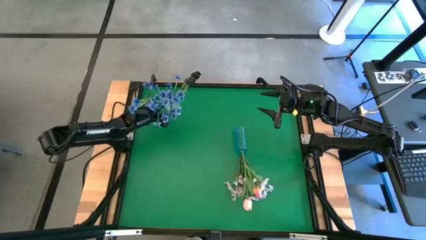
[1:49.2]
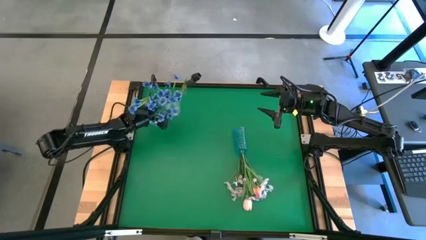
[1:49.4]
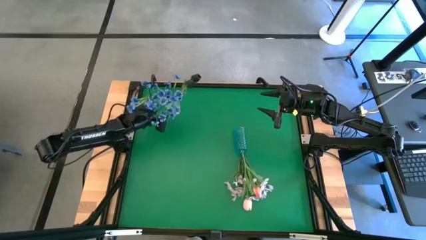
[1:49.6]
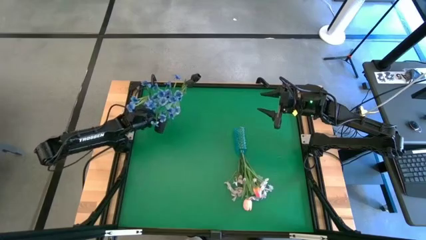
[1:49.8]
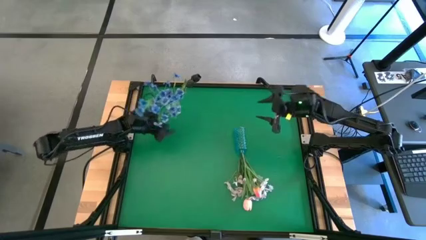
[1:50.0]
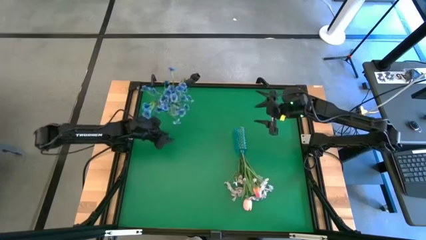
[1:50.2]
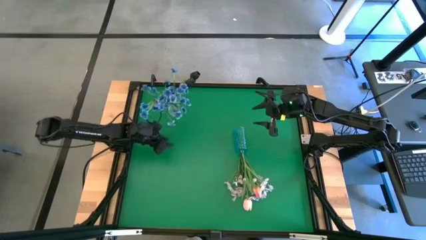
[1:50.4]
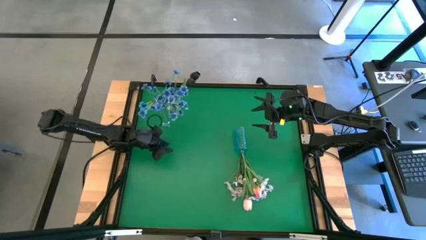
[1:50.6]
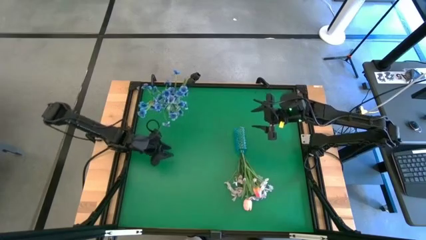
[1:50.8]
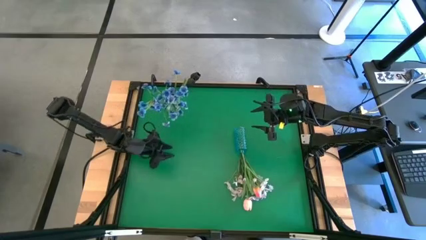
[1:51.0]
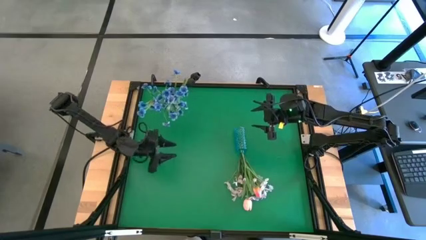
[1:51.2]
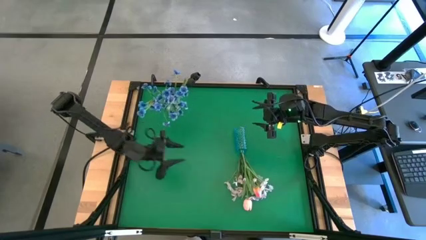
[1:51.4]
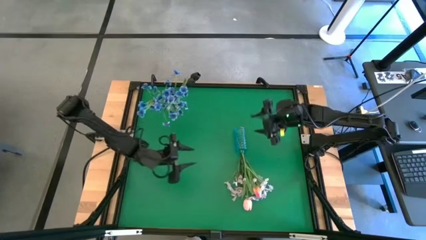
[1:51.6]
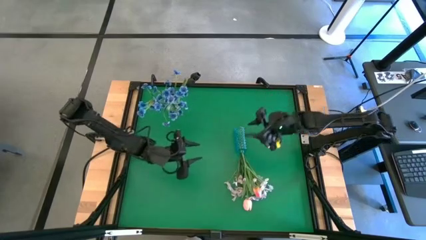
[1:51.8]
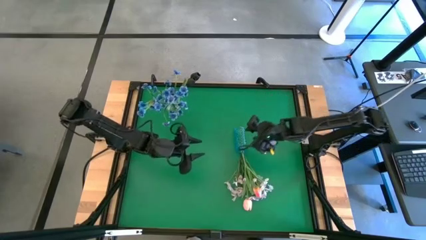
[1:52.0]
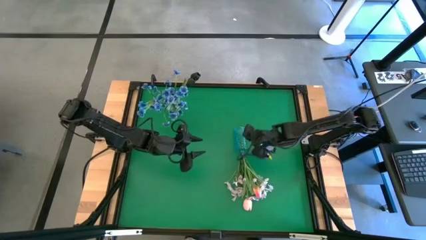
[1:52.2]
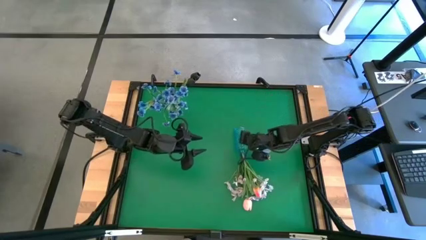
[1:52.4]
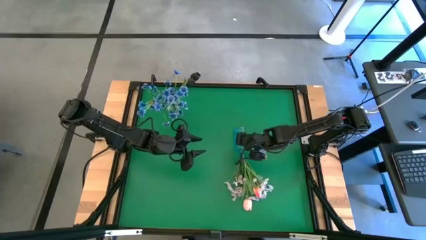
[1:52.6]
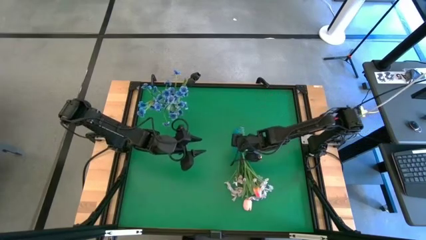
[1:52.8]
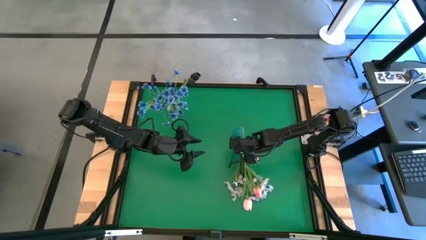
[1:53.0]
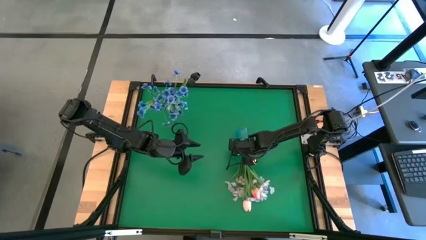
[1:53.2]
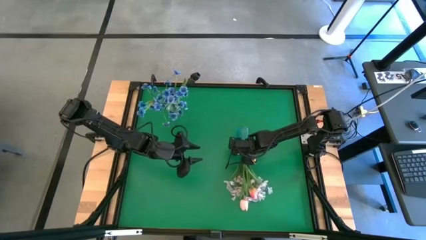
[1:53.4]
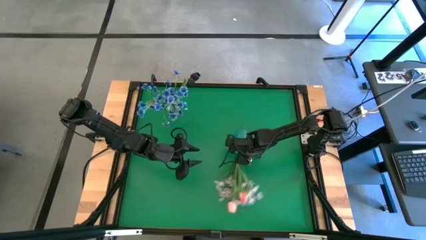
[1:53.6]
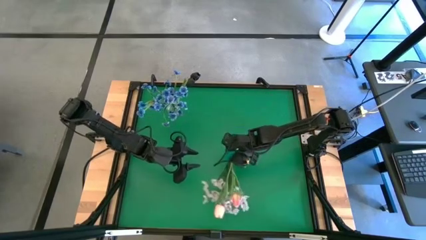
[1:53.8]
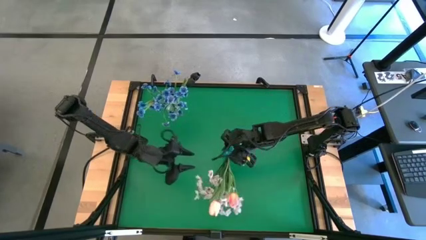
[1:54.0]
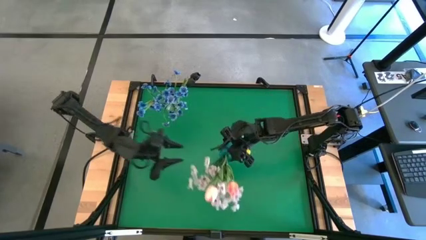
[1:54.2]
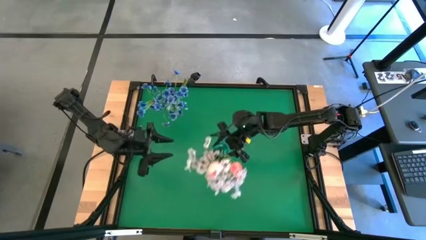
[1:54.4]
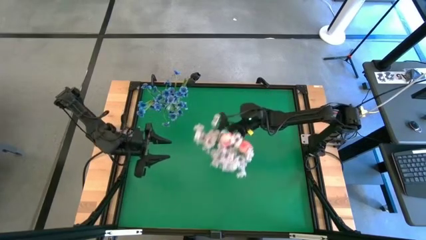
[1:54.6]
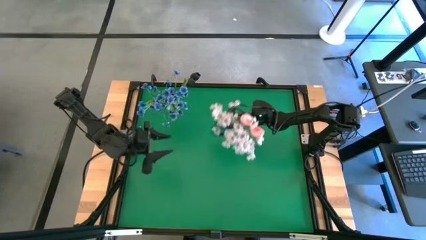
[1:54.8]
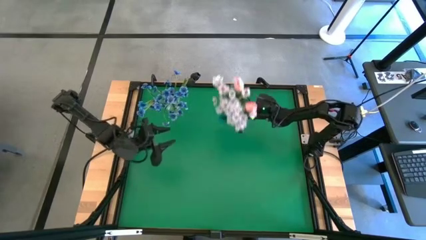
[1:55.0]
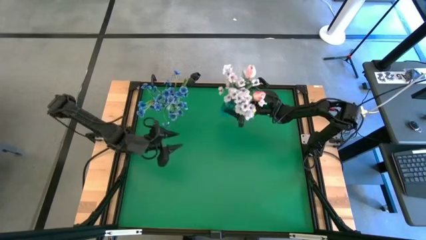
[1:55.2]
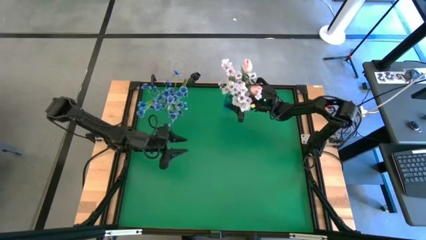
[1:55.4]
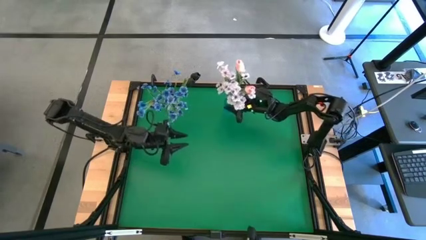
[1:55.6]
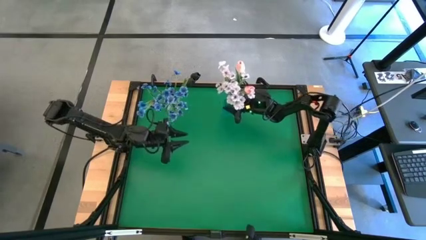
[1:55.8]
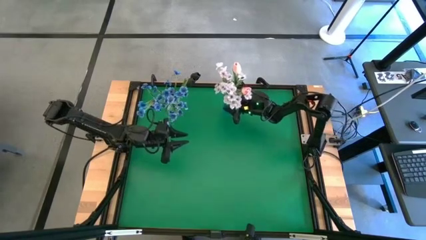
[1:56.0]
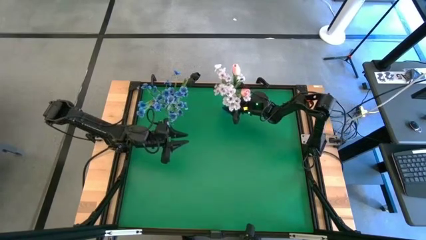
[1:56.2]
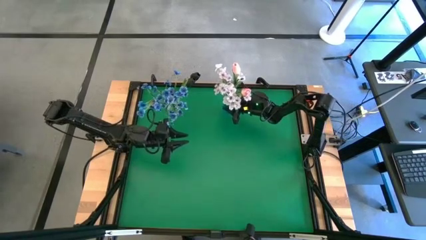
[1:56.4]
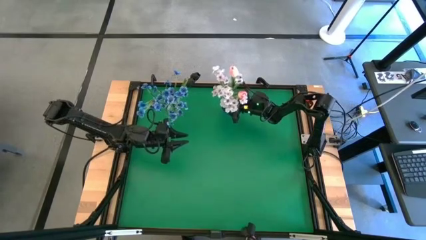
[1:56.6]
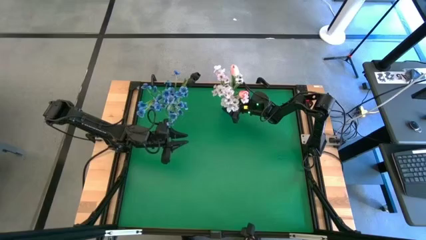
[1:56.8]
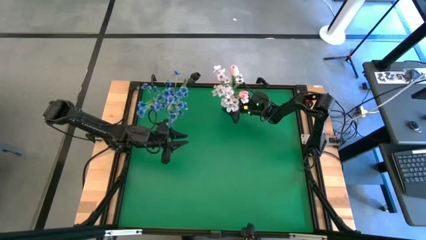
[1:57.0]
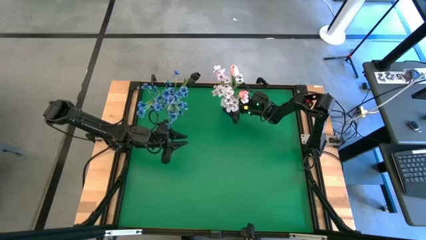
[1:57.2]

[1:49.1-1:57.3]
Task: Sort flowers into vase by color
Move the blue vase to the top middle of the table

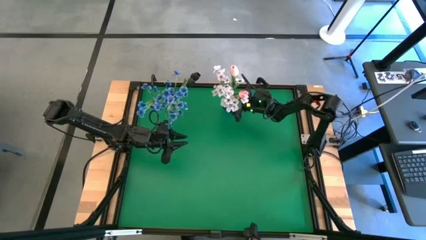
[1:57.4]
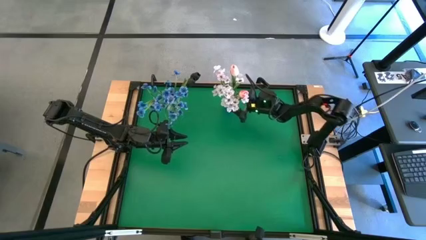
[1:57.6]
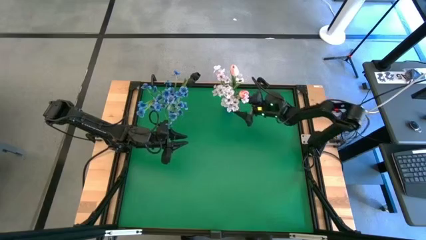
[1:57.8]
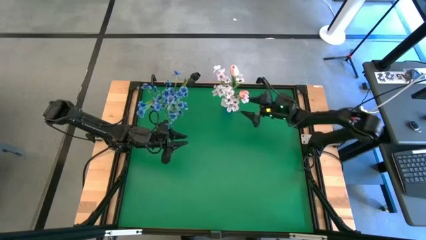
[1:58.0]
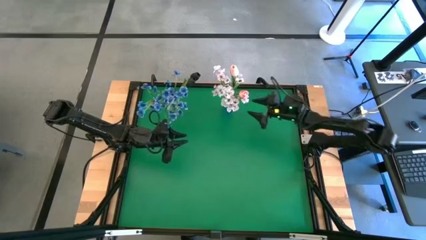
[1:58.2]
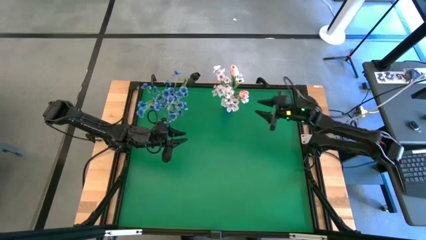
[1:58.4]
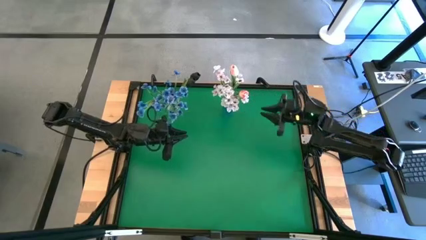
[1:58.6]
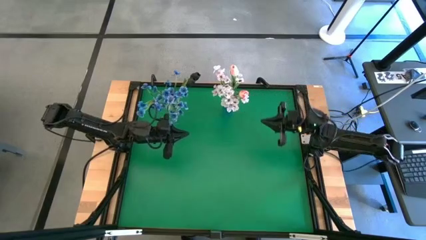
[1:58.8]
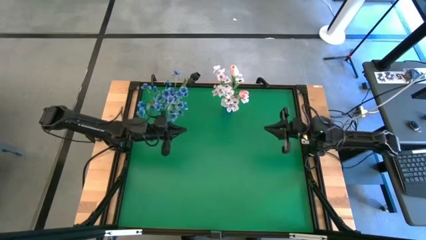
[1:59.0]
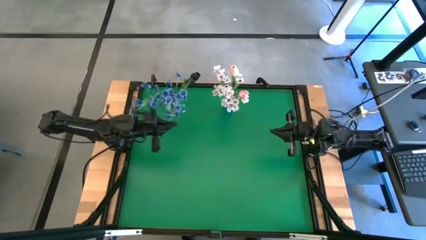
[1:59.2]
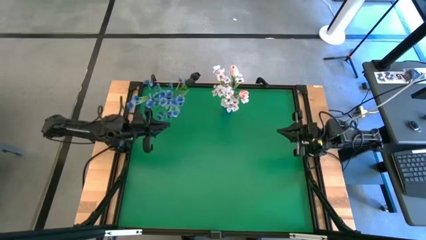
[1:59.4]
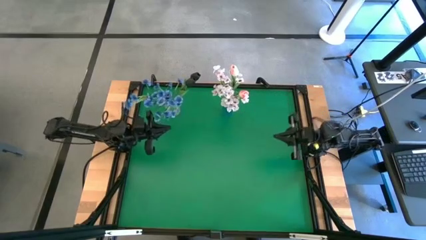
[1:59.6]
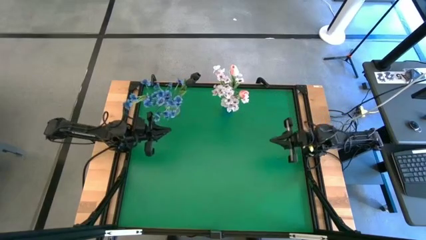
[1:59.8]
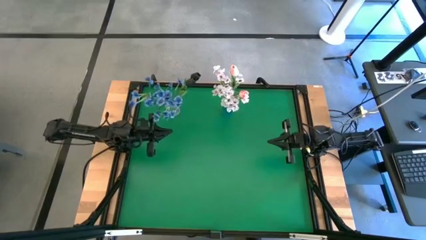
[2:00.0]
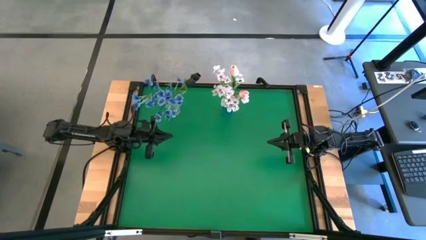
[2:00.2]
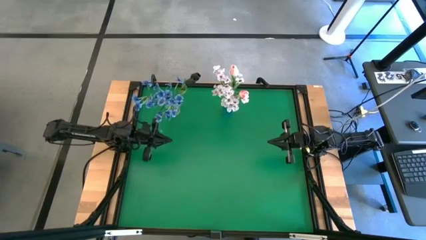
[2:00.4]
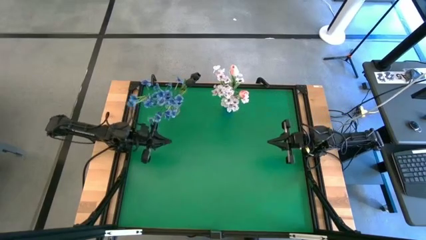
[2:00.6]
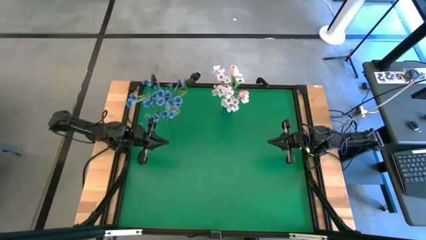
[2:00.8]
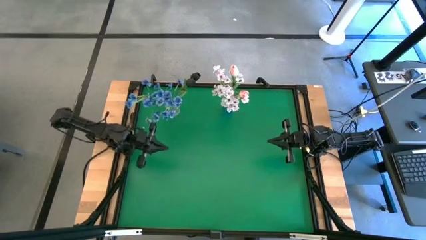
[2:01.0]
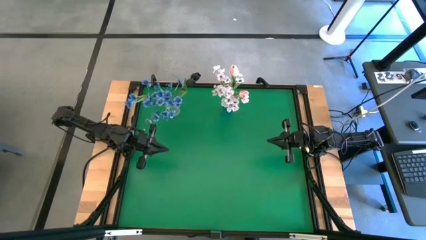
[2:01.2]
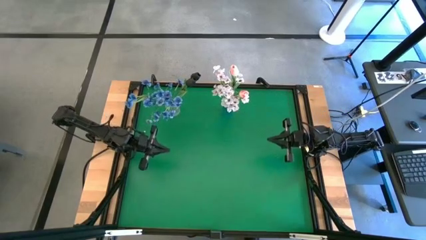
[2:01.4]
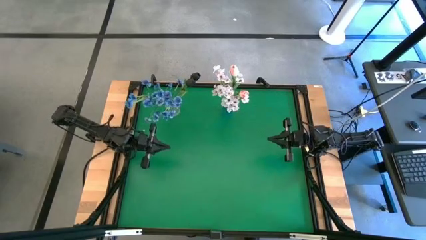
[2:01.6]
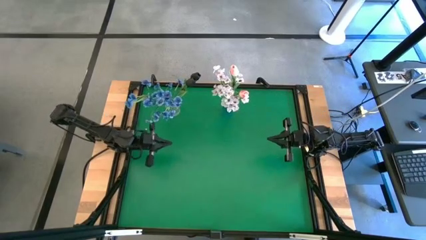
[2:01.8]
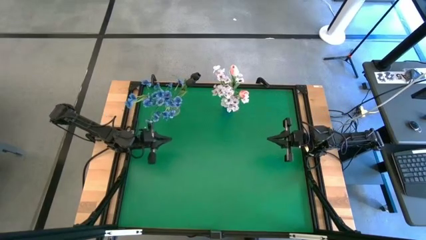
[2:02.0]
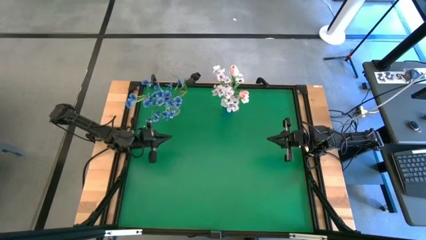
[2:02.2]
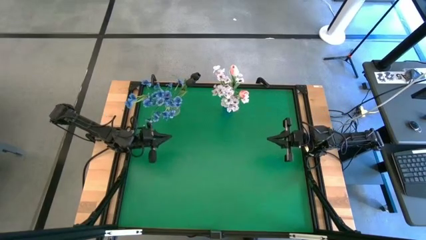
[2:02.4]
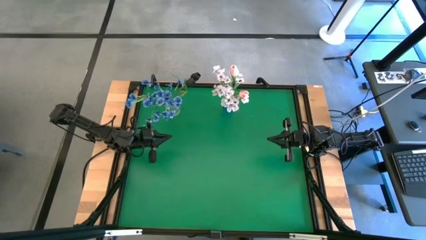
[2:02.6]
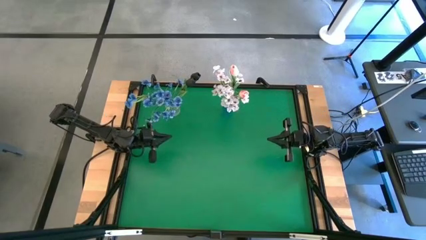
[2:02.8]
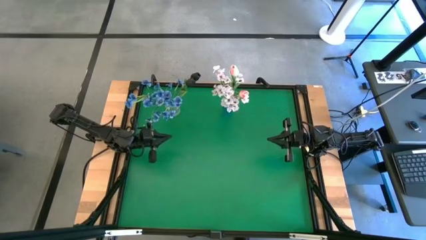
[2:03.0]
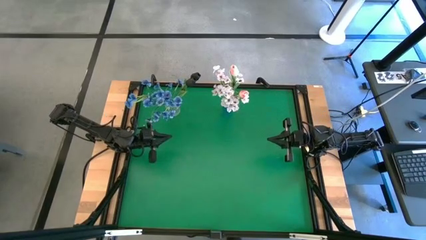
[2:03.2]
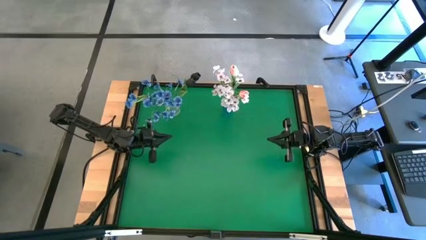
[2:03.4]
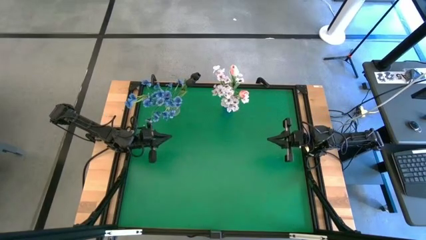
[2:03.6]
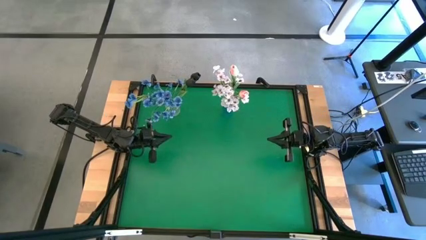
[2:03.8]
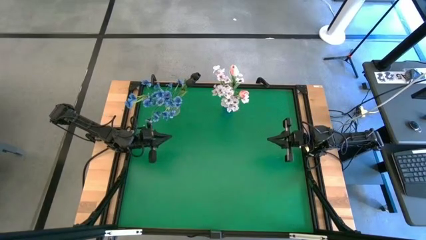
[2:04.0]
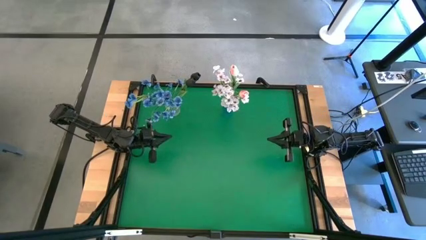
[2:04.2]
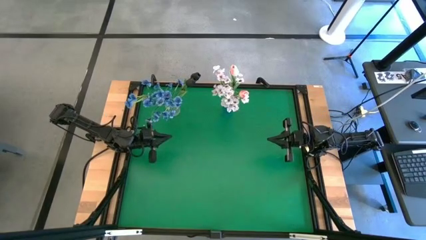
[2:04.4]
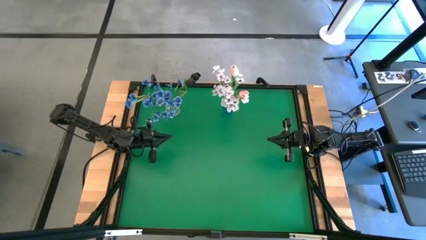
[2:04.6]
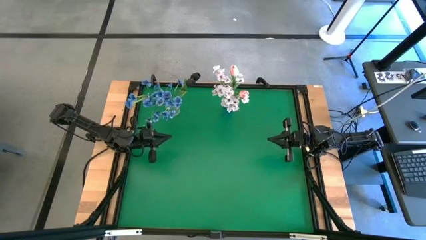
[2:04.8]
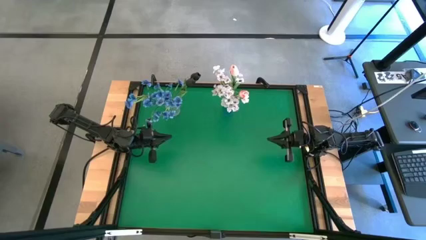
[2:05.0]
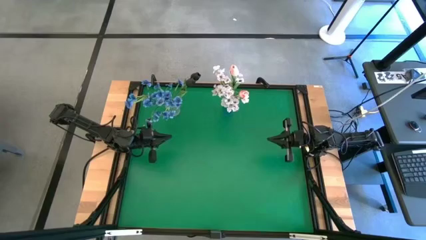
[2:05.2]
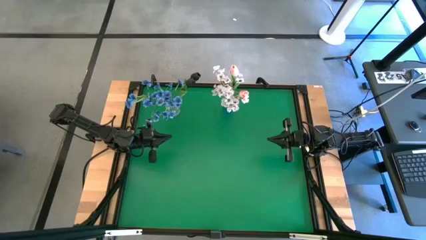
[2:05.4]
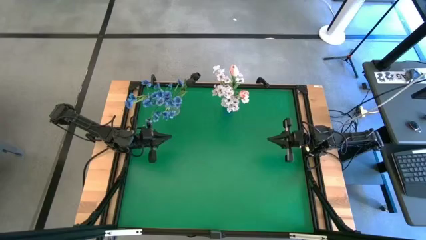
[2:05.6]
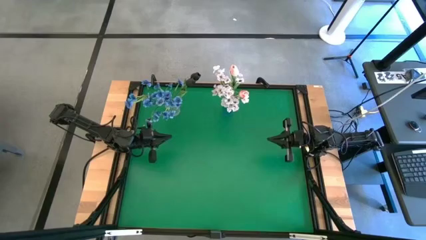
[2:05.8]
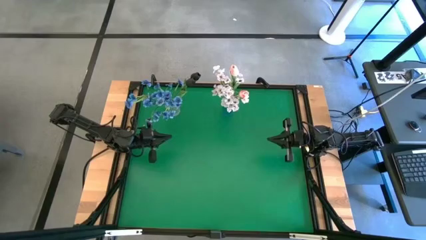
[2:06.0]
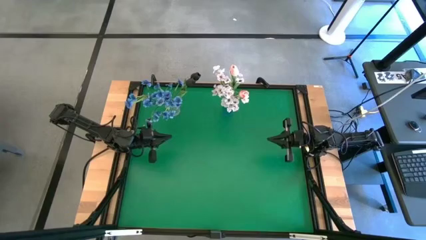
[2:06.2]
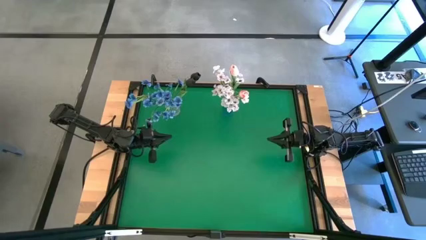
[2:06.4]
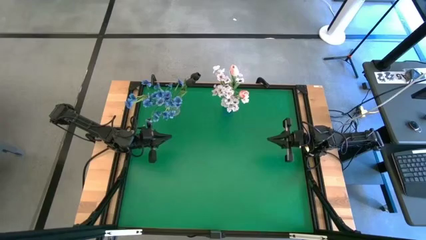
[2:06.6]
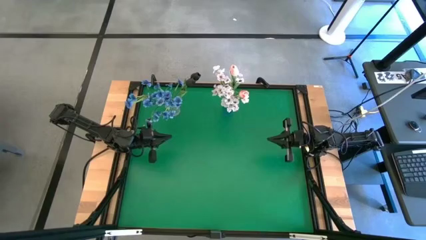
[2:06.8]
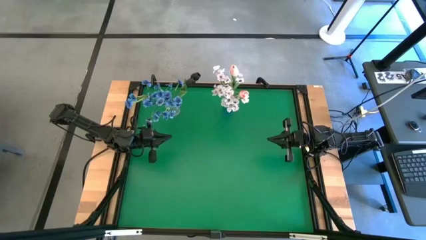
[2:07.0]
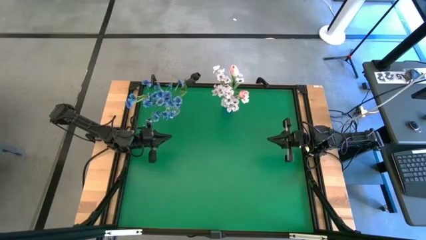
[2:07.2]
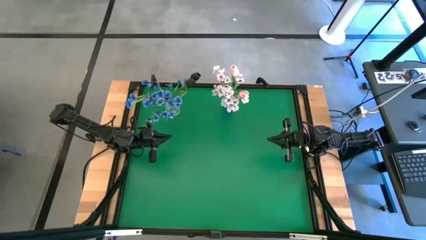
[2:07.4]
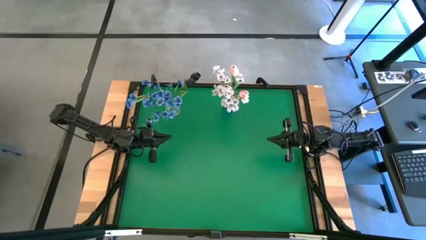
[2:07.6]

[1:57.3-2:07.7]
Return to Home Position
